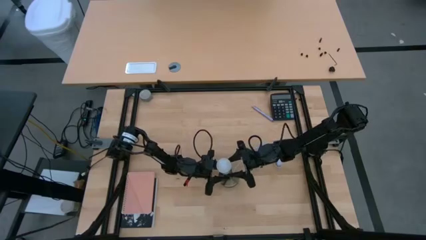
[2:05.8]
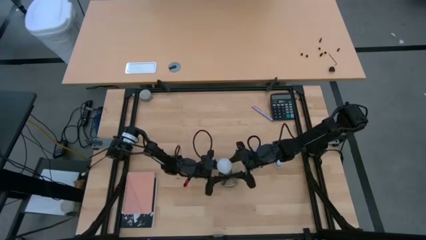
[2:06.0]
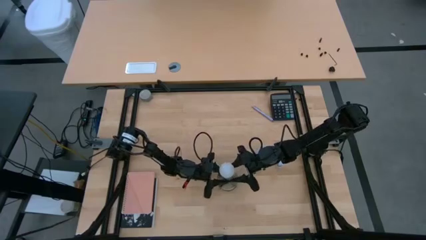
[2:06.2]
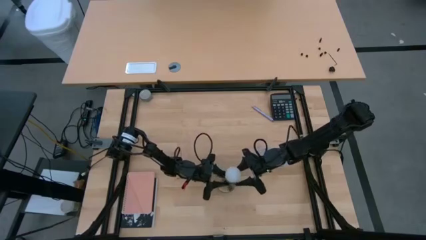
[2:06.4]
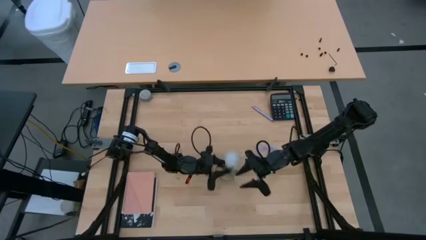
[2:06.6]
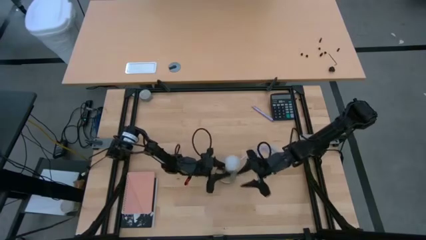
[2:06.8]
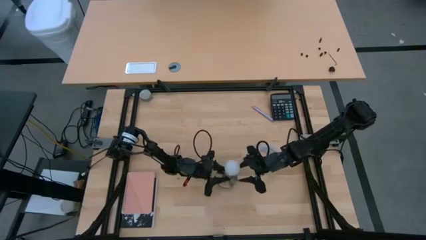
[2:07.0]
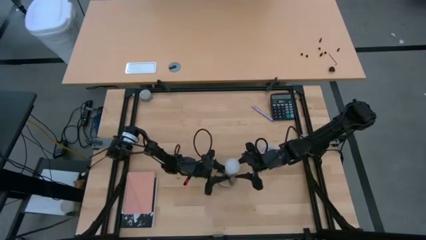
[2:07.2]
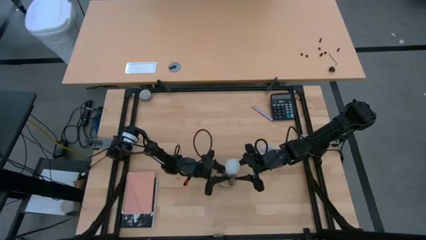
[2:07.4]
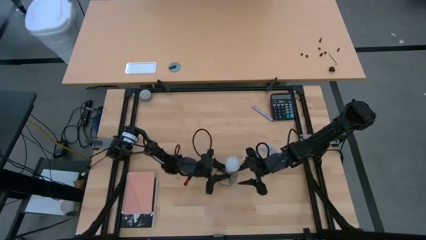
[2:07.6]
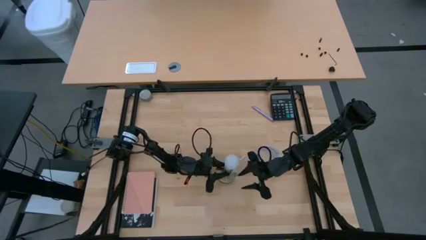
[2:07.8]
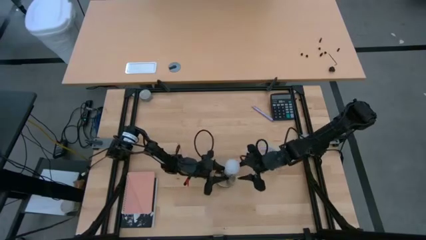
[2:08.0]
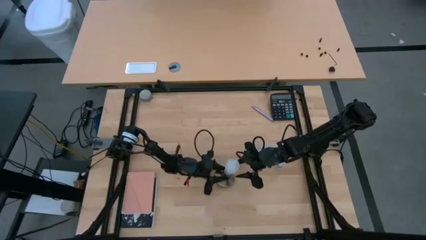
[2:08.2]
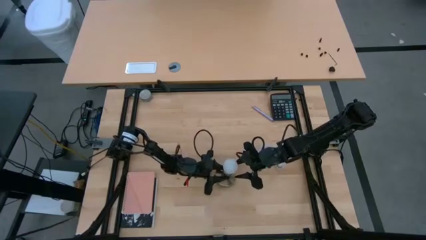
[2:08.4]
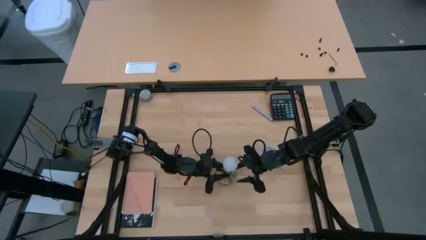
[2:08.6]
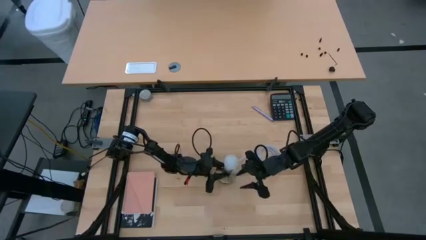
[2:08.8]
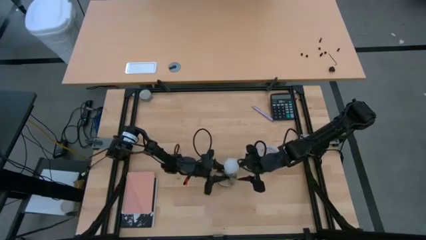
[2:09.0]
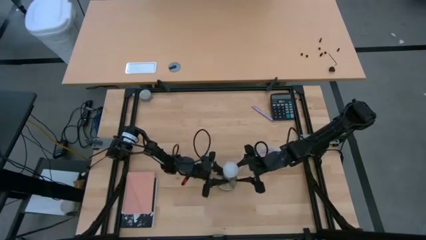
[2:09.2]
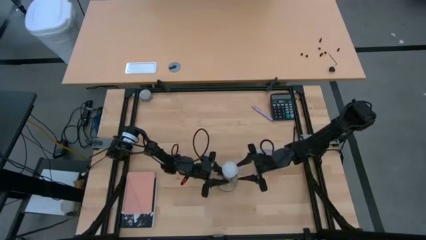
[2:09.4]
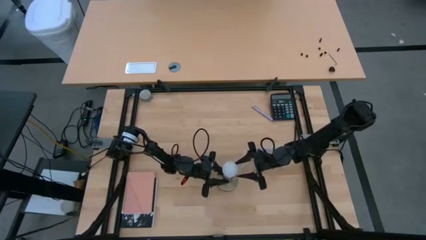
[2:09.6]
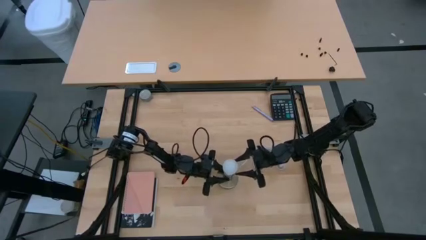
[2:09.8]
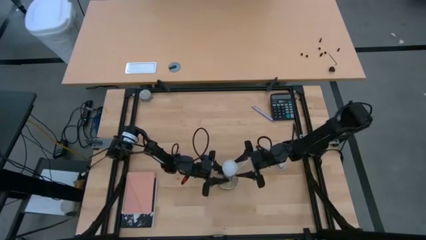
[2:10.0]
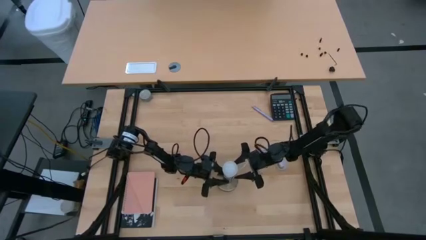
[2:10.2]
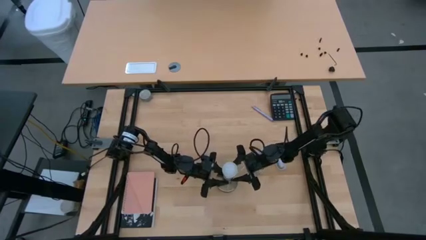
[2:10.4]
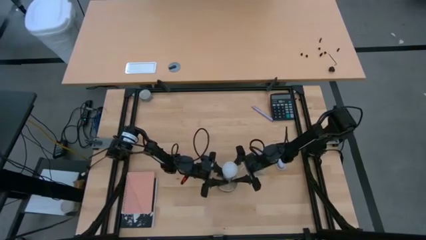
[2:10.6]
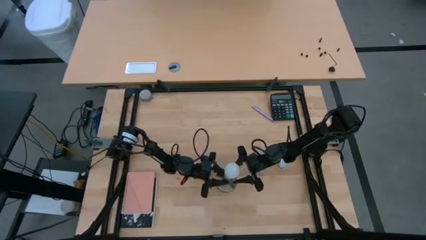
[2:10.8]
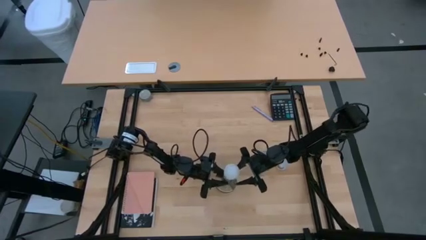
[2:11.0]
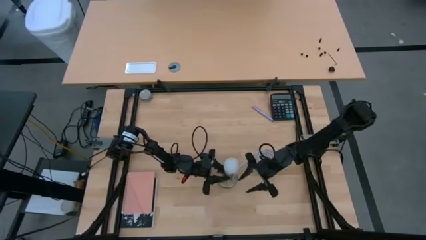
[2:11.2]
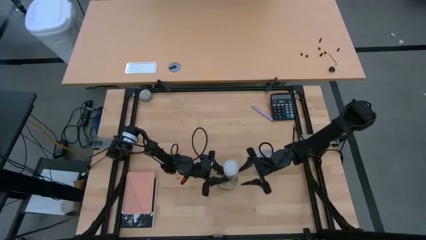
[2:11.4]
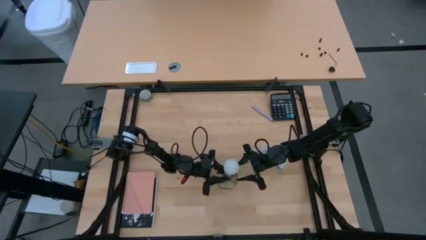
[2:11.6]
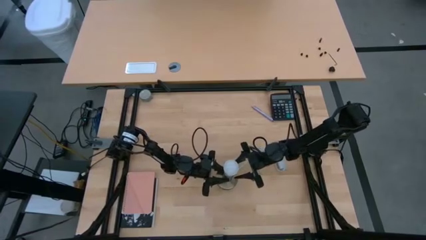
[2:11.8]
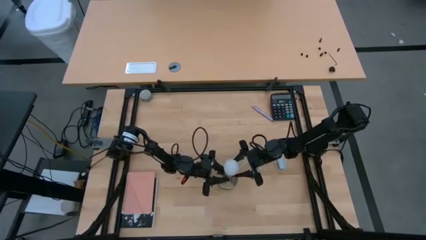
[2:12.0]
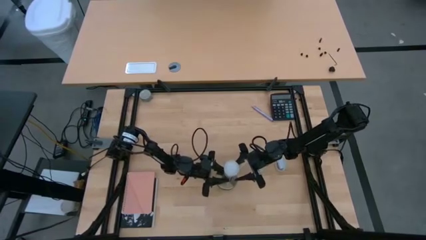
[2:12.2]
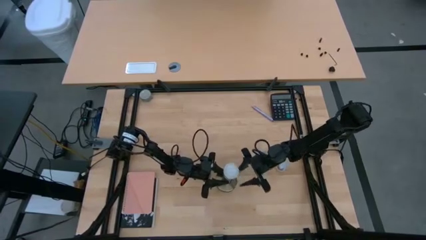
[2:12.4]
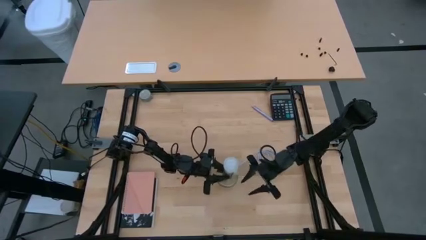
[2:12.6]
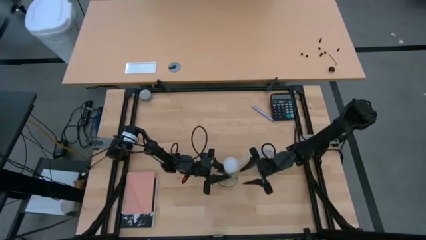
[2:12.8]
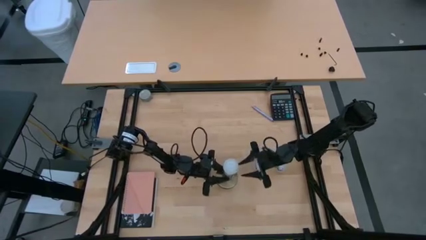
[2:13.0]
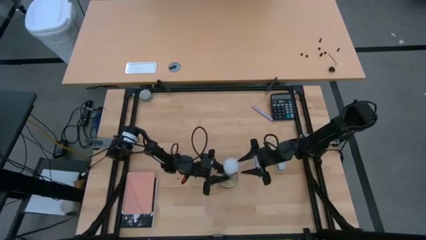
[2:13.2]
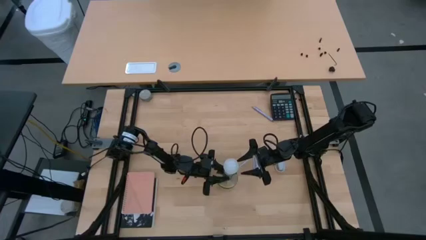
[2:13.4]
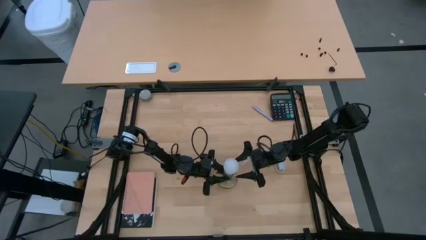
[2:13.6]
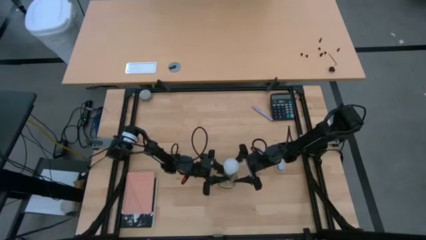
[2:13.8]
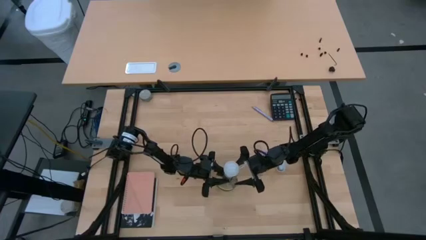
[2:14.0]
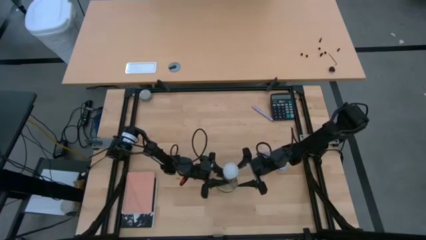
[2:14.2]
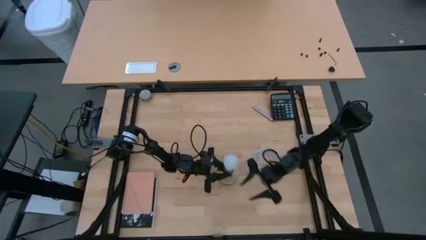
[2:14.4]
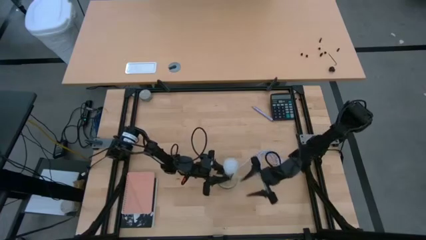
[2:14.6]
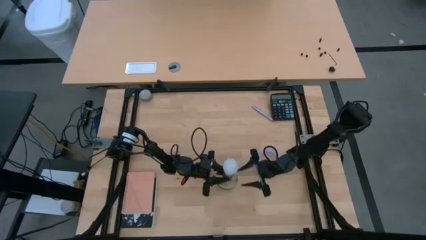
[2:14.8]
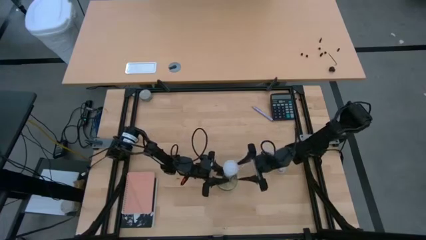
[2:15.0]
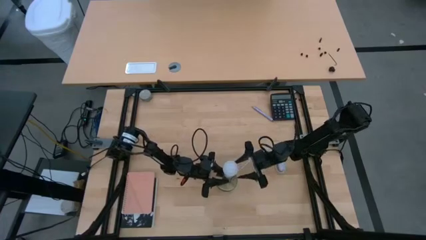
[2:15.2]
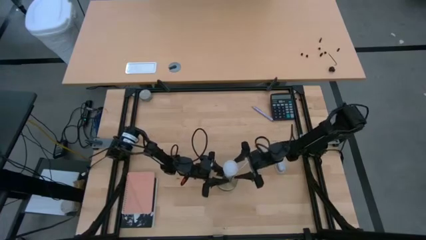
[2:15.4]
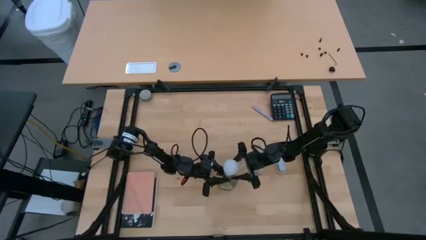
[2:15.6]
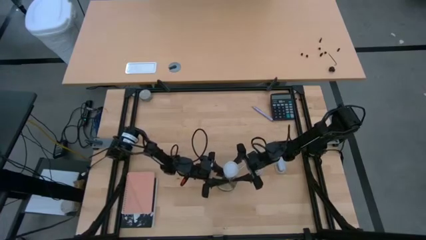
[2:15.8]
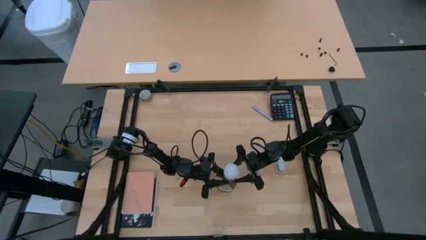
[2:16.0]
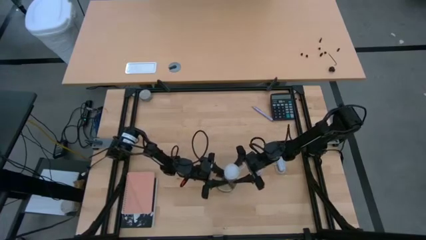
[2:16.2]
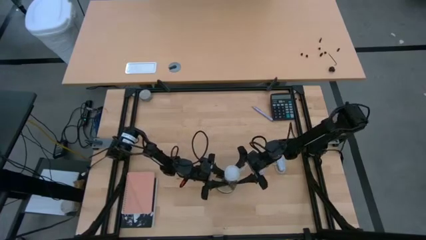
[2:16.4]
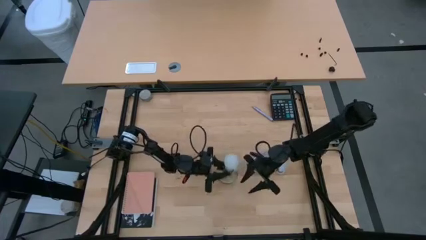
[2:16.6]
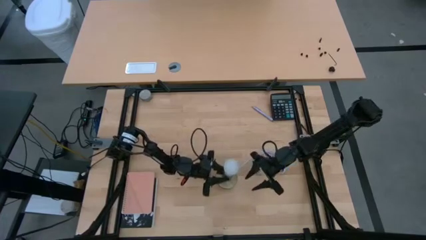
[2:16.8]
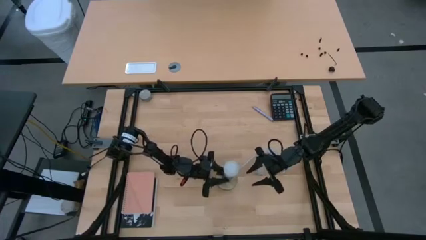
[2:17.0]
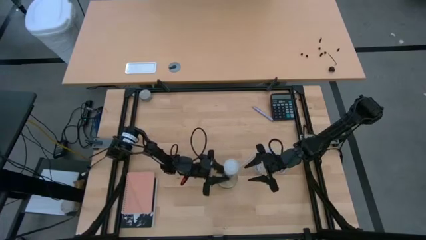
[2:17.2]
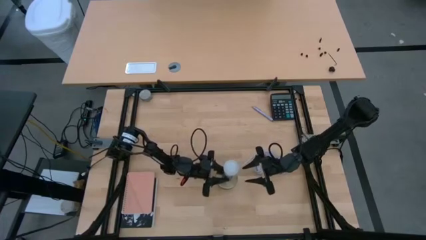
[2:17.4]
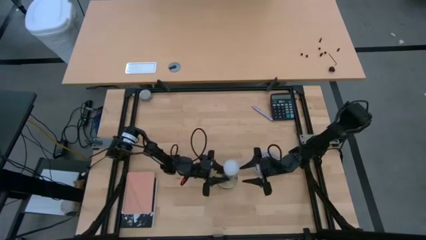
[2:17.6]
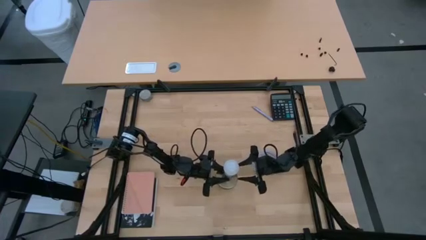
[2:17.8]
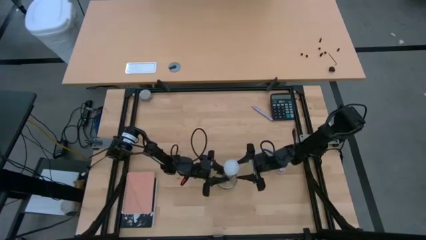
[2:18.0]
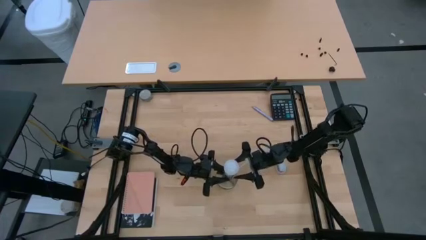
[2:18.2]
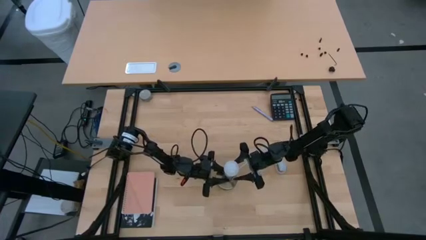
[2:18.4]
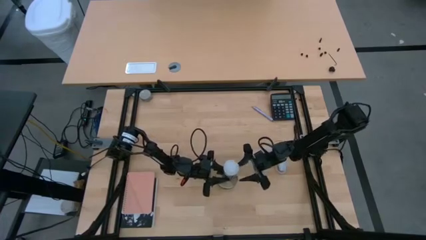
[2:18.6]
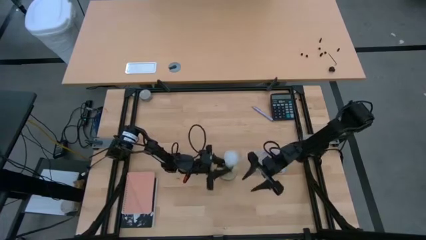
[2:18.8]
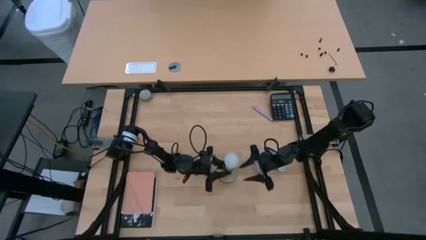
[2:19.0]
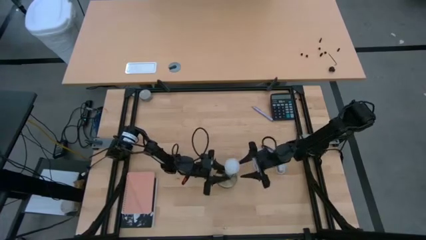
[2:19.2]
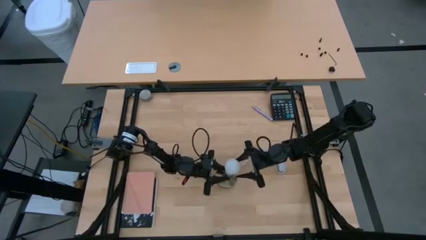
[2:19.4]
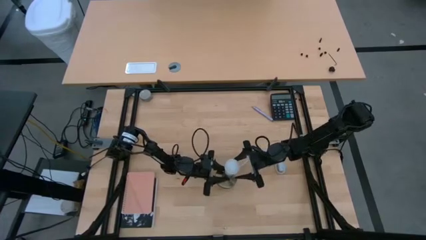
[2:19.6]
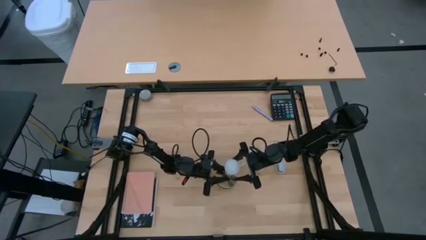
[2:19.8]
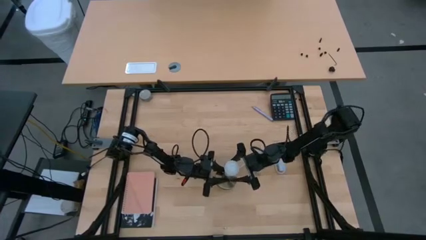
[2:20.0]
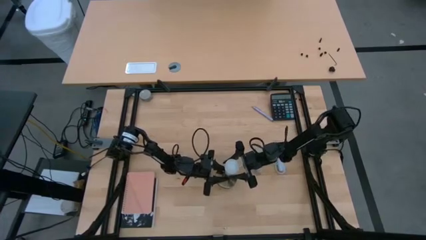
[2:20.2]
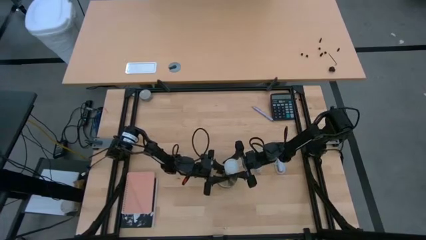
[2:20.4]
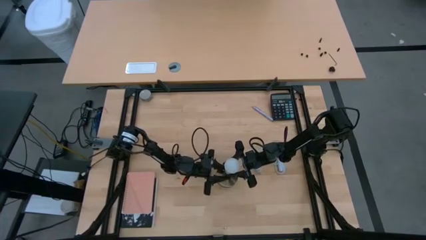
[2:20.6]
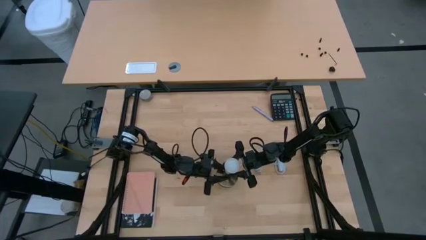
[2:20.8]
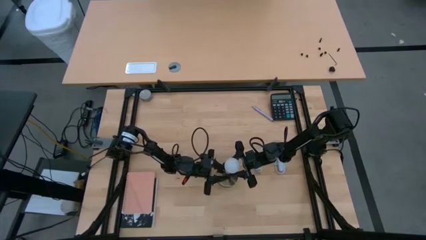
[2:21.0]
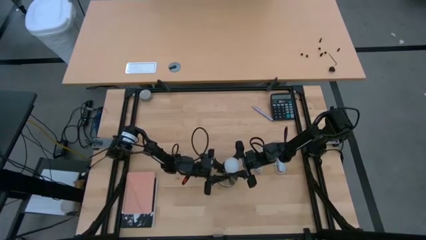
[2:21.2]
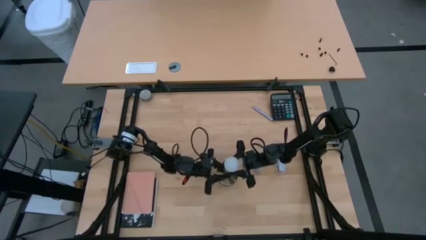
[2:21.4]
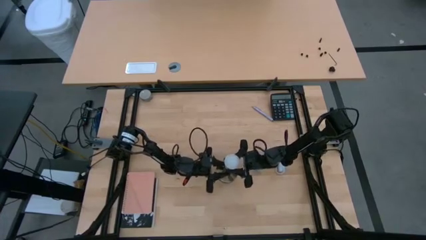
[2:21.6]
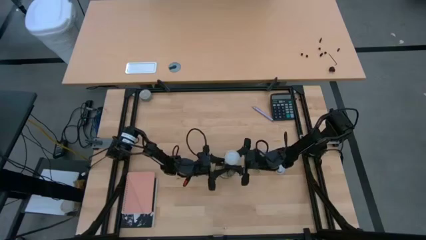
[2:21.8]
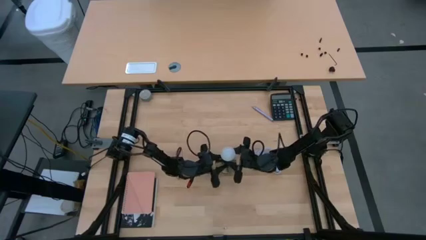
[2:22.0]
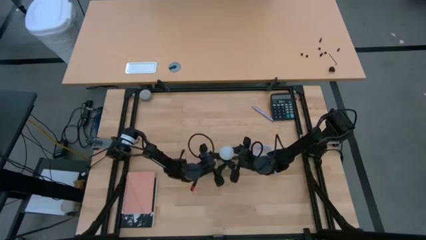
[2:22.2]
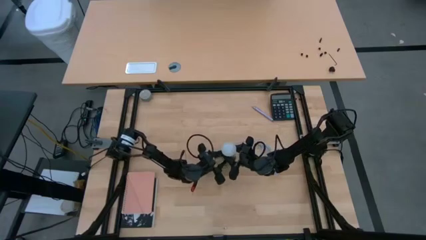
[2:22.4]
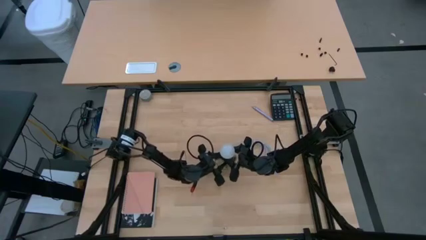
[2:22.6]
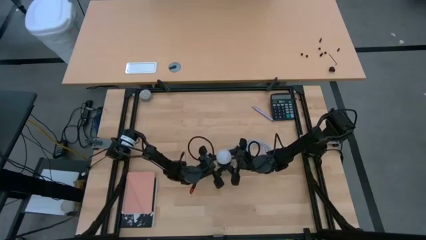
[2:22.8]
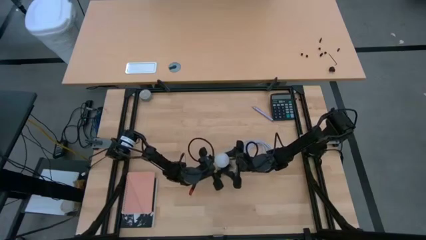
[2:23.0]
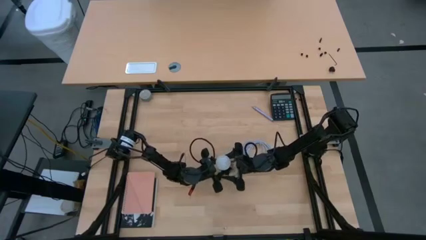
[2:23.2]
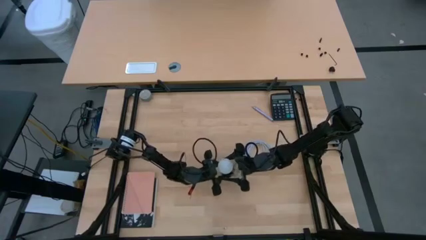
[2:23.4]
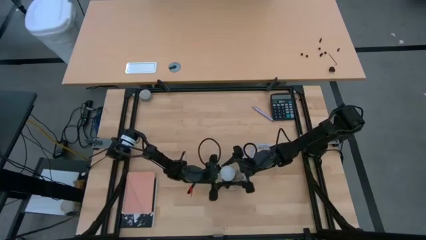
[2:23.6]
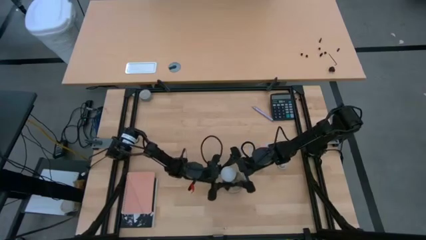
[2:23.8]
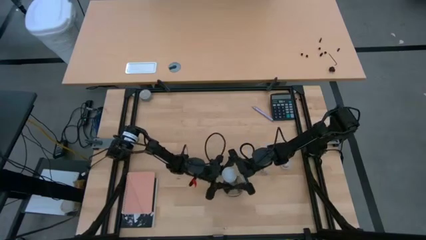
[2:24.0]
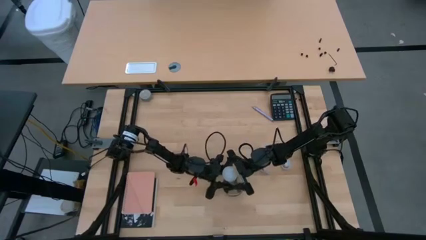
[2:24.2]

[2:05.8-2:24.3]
Task: Screw lightbulb
Insert the lightbulb on the lamp
